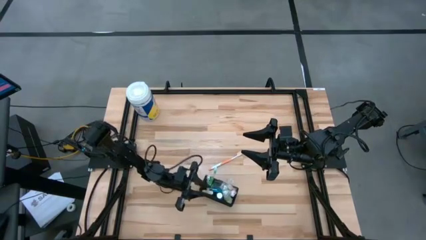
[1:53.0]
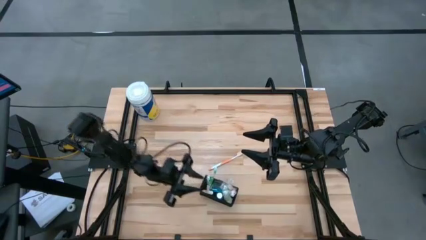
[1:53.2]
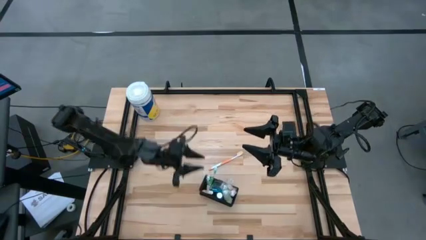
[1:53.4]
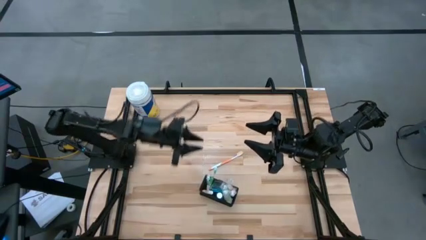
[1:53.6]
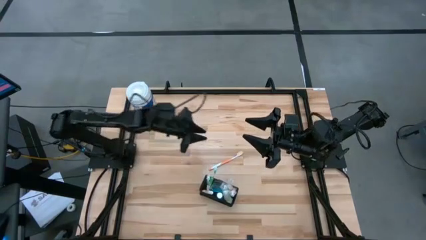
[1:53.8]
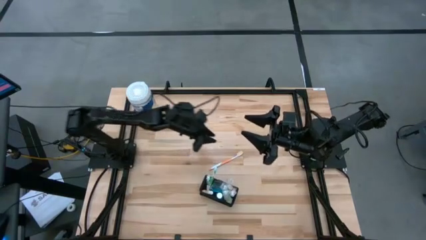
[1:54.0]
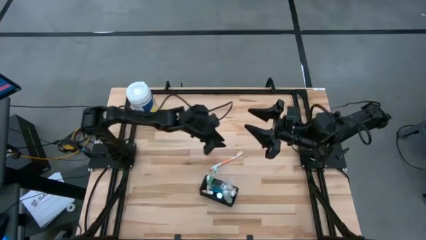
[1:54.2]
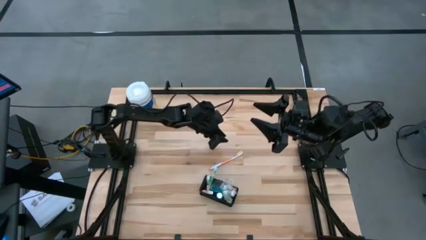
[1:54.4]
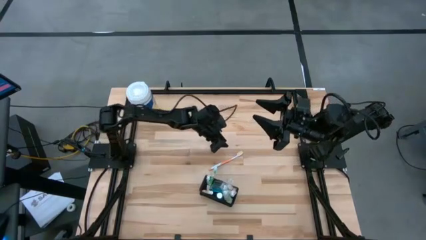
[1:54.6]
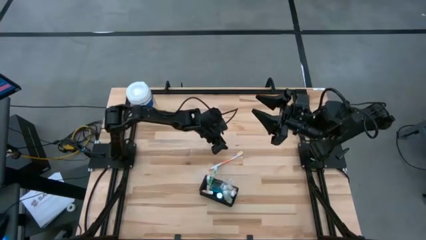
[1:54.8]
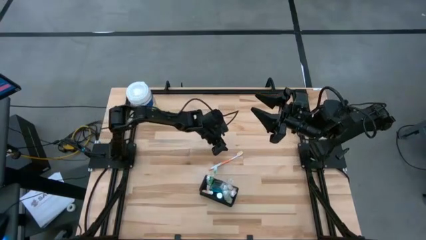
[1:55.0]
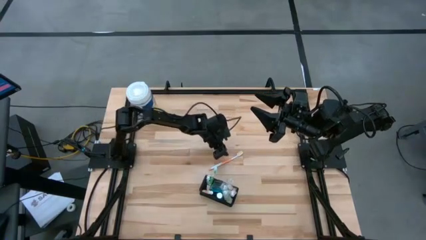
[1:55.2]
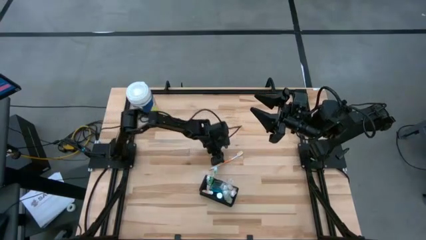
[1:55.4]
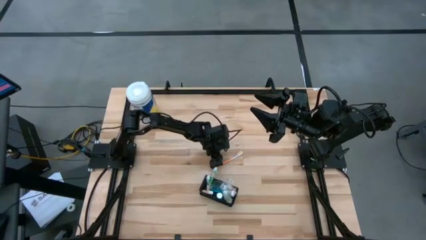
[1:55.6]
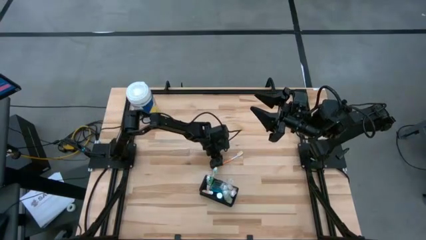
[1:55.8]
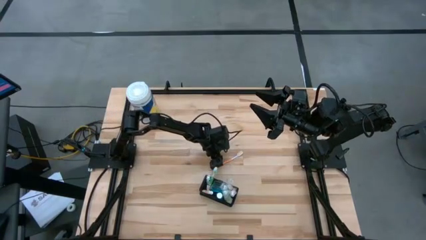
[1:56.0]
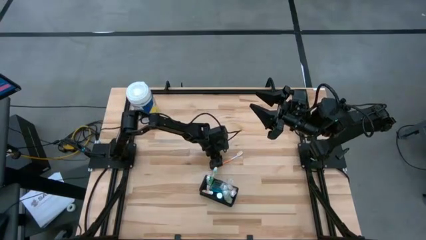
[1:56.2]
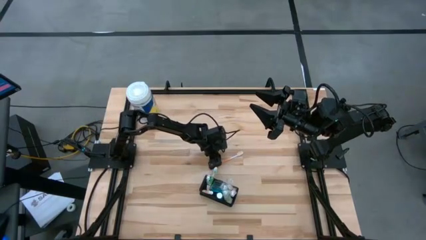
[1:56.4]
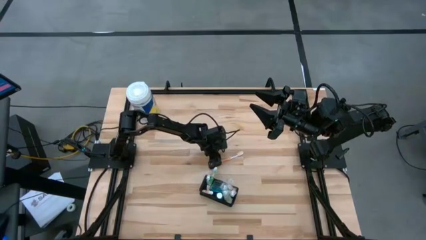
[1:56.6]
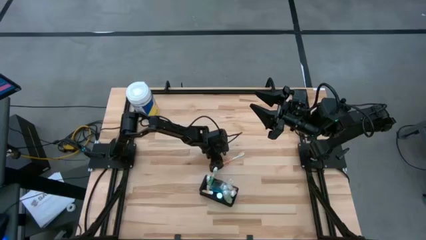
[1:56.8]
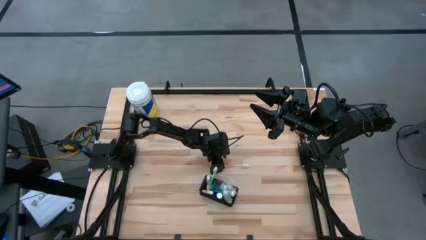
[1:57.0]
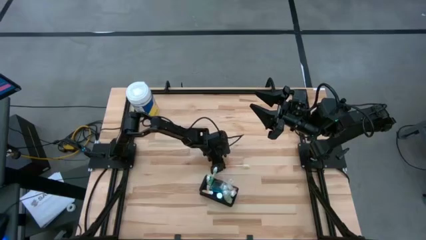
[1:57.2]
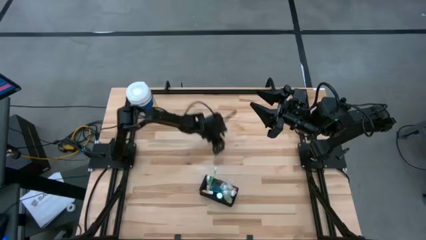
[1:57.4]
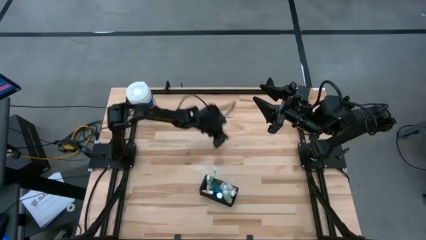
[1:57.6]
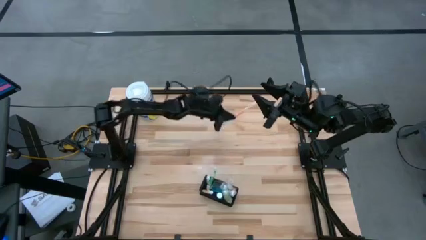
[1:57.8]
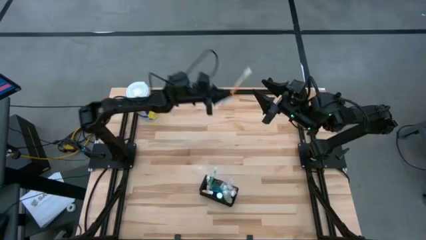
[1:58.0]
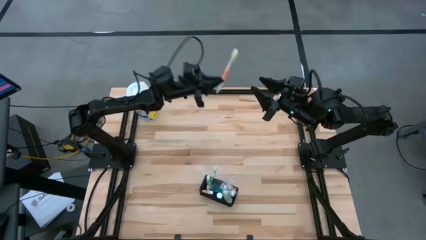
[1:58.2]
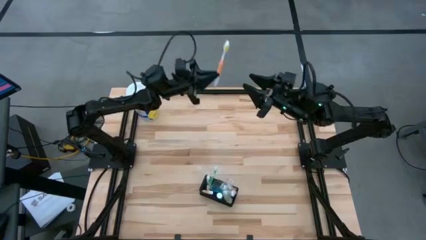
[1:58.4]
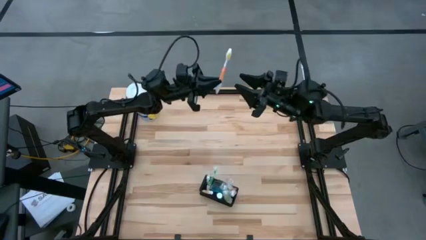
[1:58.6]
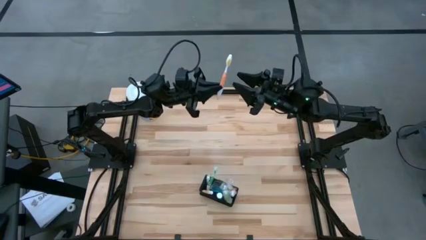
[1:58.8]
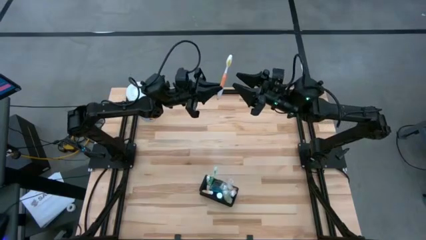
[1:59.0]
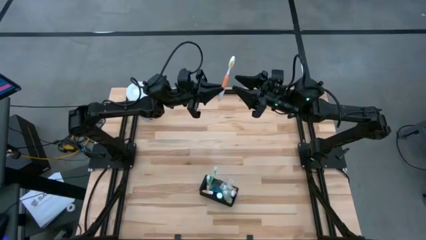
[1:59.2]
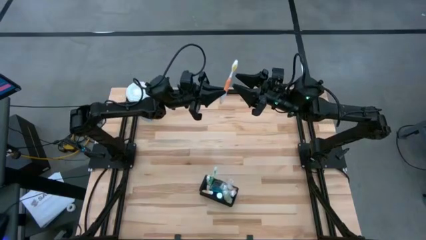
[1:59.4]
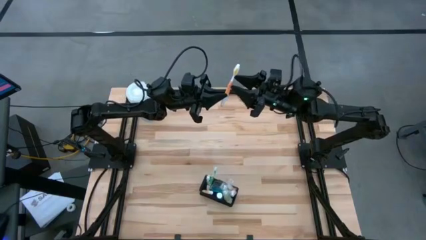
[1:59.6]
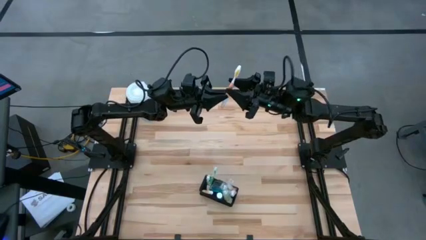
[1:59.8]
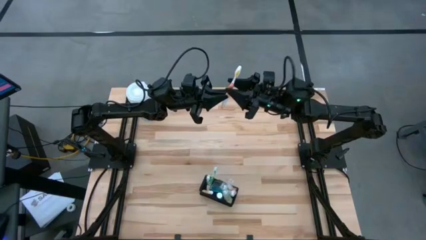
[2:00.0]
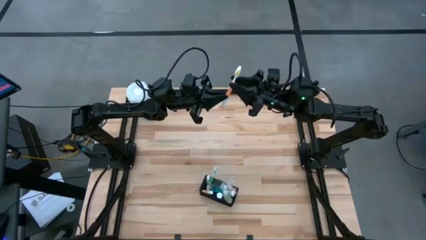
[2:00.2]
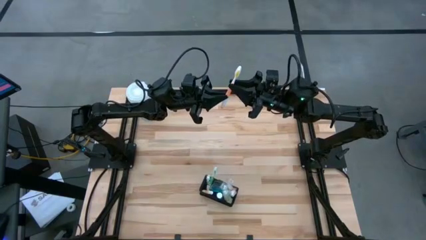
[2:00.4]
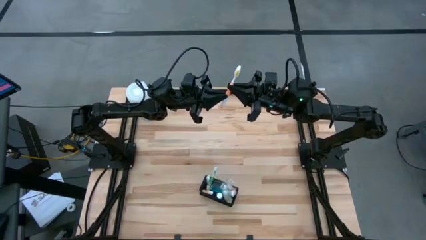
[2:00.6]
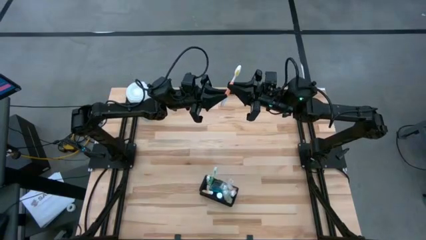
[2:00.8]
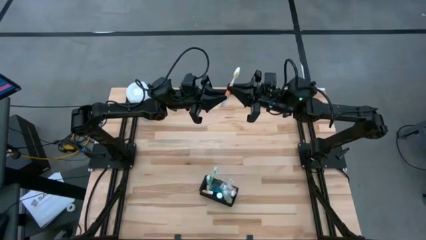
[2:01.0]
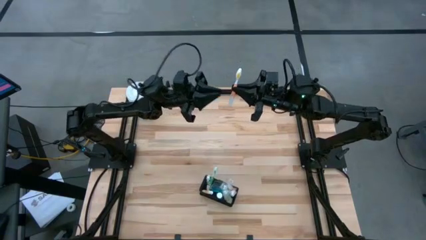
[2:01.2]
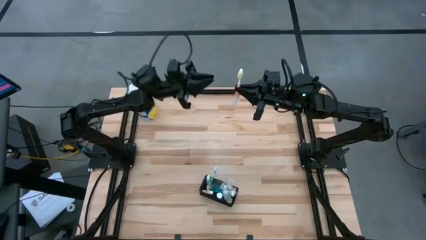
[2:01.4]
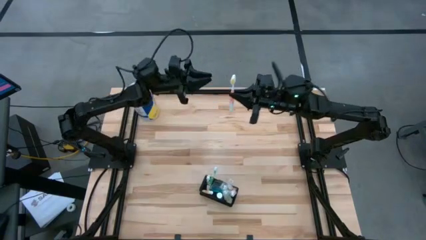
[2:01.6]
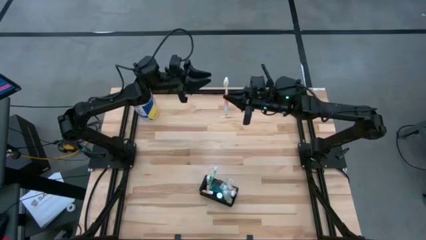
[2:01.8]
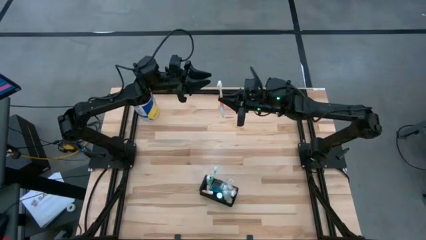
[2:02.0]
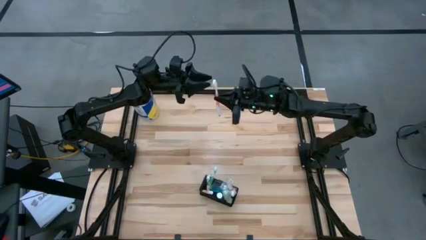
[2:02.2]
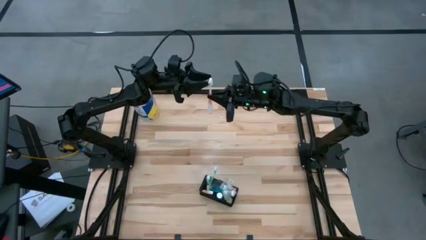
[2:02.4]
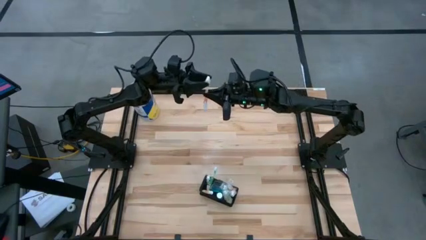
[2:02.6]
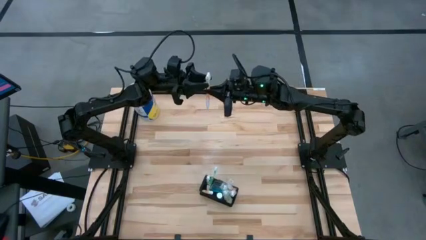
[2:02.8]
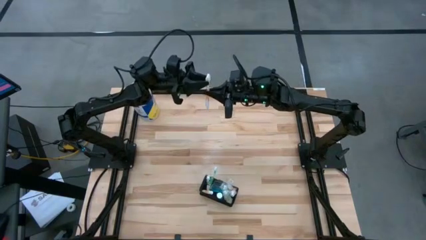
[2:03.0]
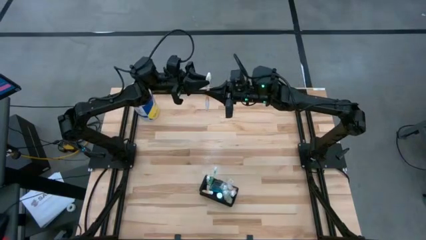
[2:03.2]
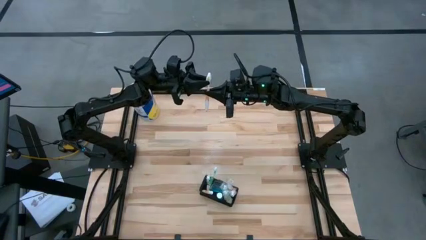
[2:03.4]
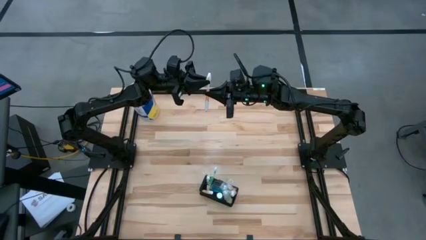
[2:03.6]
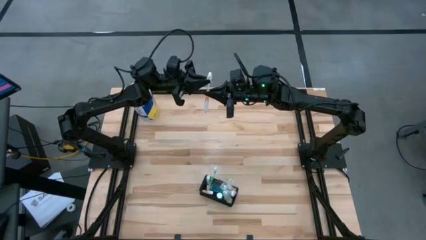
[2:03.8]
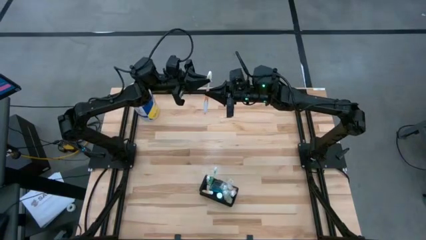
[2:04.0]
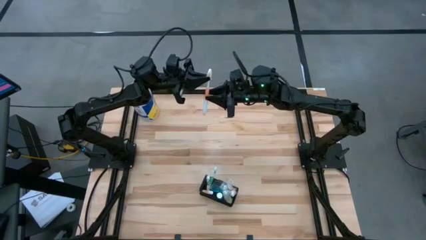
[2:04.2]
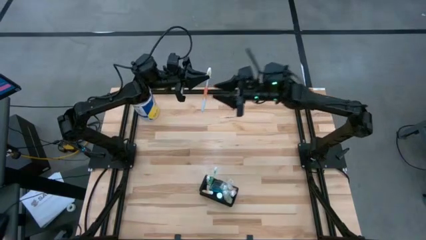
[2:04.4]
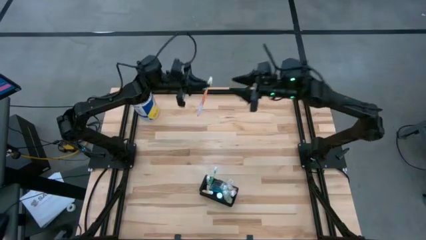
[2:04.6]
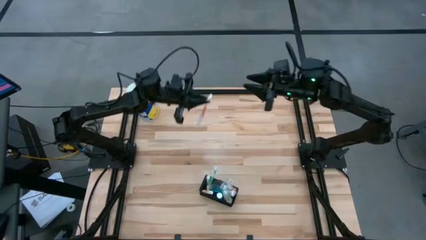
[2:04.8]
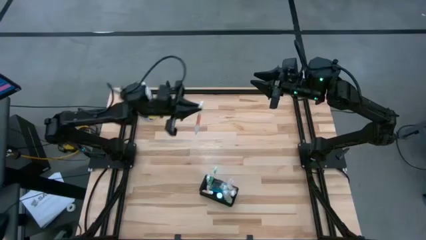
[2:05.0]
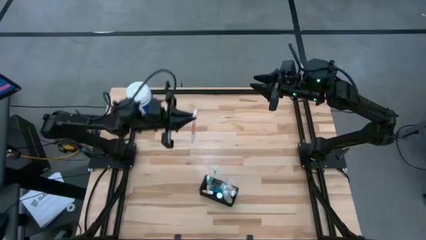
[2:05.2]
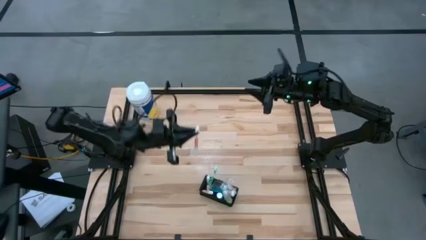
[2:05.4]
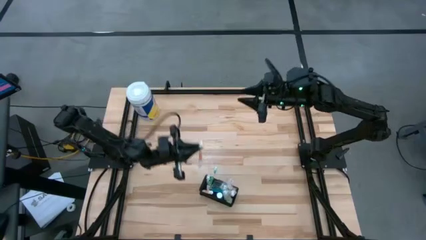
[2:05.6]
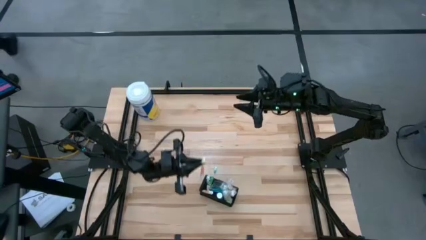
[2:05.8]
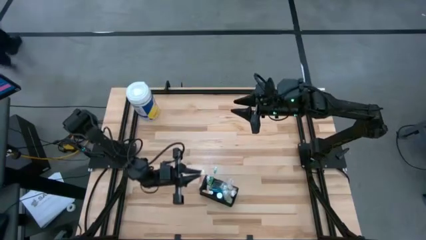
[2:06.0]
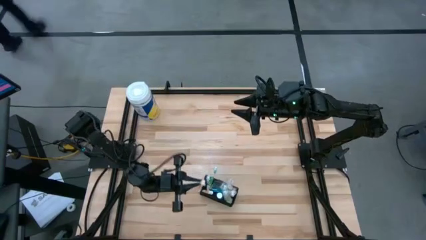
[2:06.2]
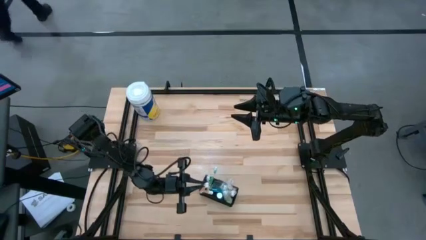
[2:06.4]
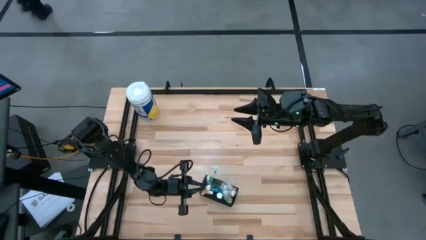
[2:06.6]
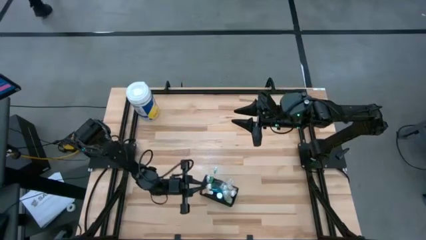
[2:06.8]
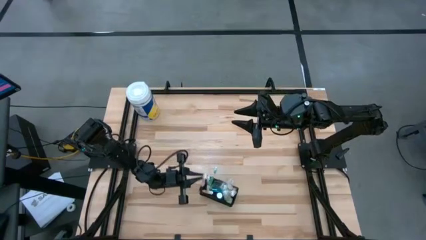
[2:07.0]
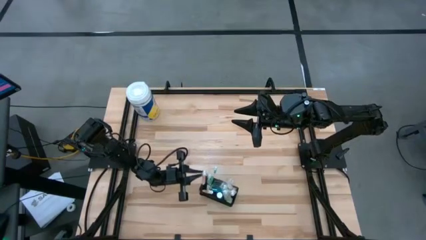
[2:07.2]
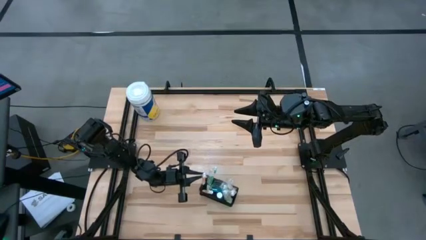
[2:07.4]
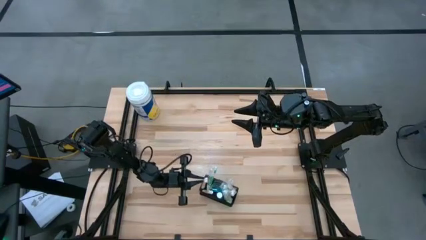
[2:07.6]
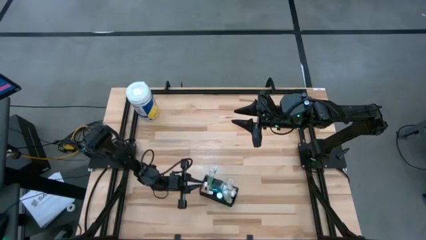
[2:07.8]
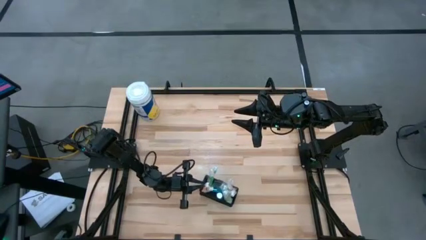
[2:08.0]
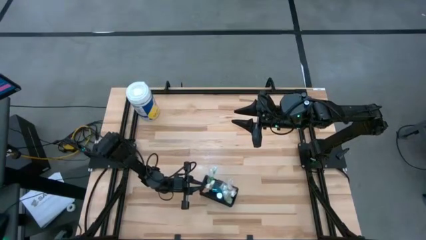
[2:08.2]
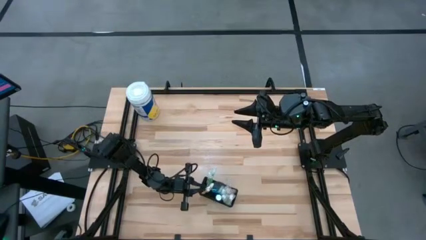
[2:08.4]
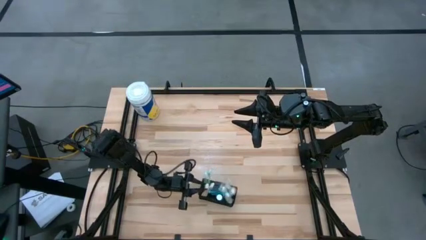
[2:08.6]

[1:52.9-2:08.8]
Task: Pick & Place toothbrushing station
Put the orange toothbrush into the black wire organizer

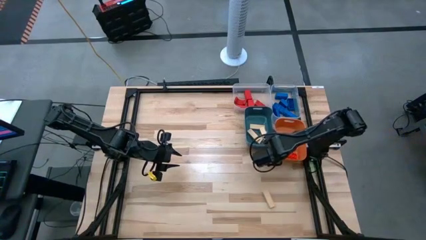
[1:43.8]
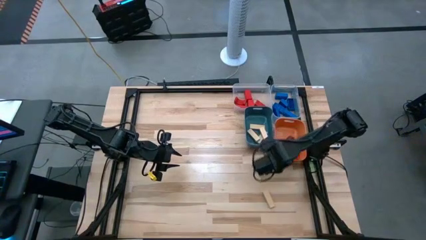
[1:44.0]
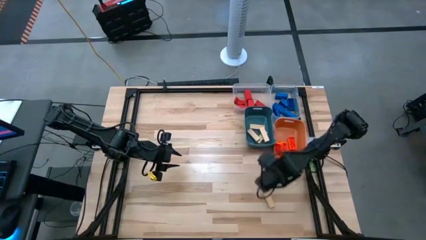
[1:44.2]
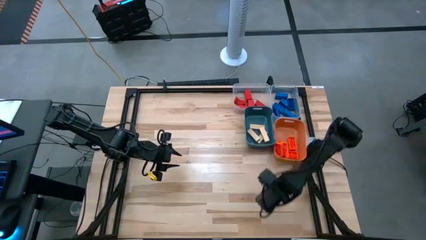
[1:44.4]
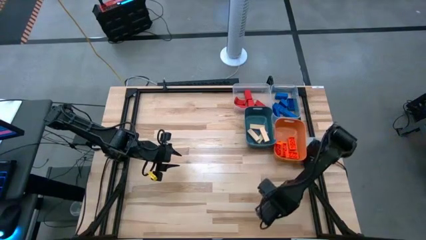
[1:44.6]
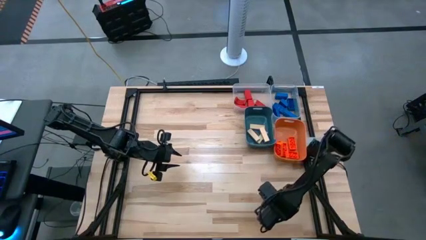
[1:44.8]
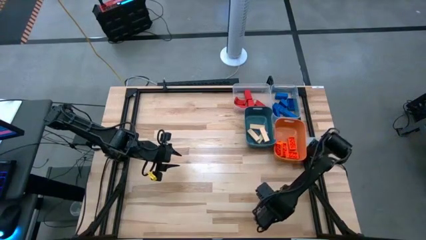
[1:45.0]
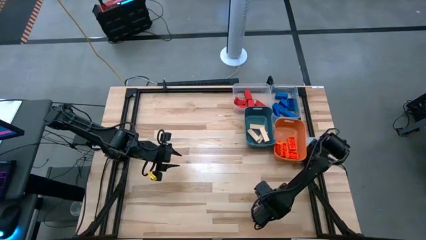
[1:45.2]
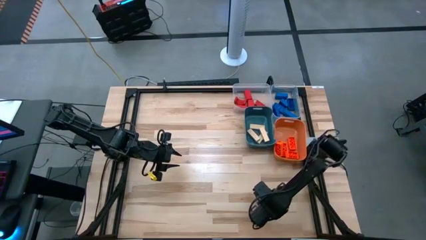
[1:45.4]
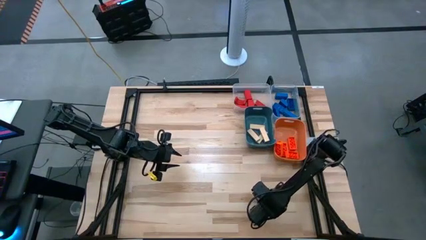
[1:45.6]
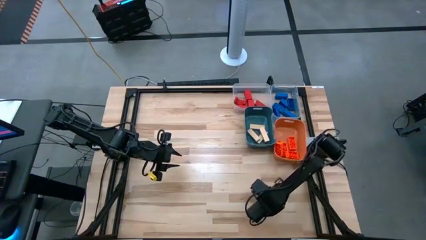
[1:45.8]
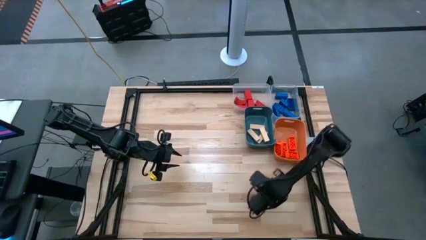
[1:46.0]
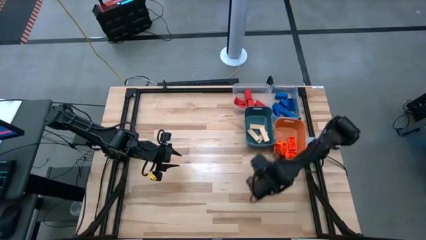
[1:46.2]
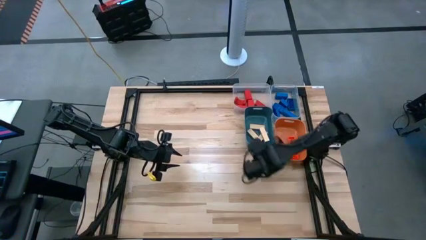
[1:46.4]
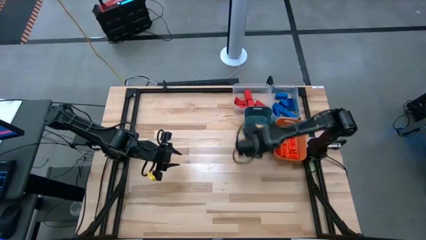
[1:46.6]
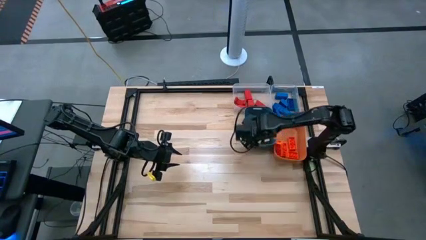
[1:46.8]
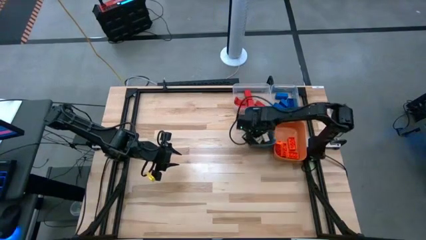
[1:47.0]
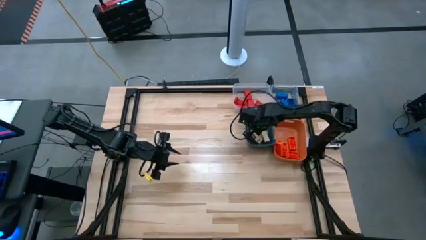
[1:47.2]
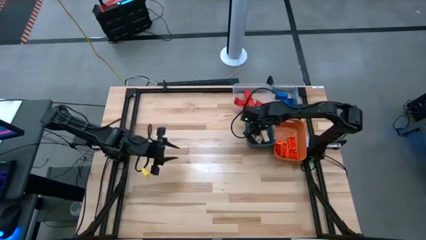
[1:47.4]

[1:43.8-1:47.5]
Task: Sort blocks
Put the brown block into the blue bin
